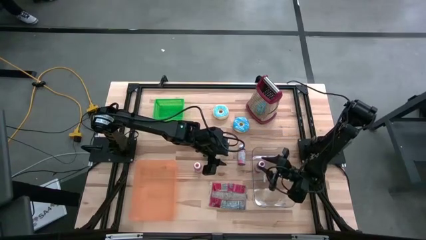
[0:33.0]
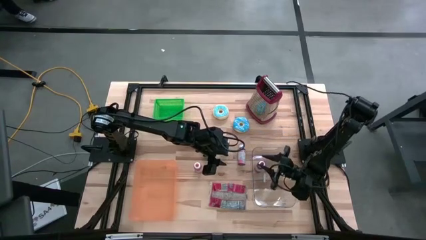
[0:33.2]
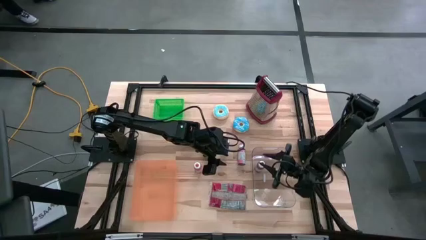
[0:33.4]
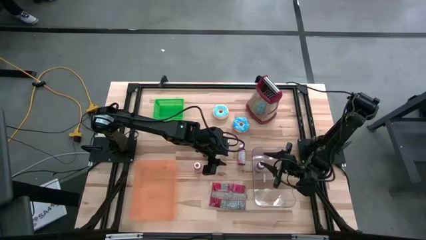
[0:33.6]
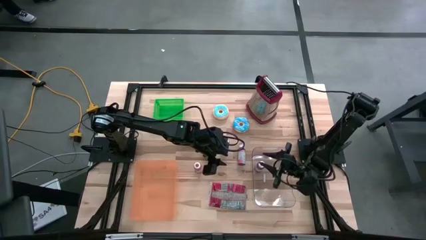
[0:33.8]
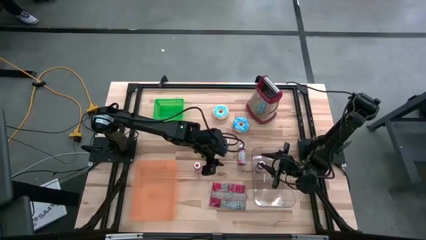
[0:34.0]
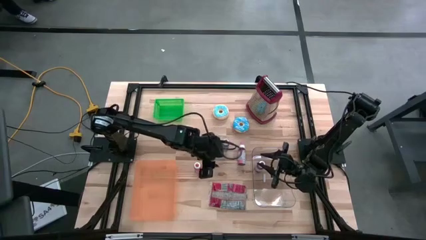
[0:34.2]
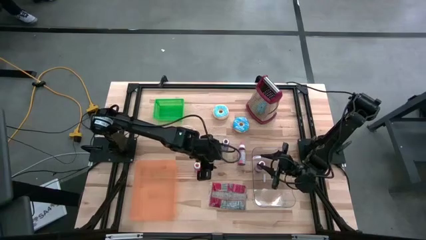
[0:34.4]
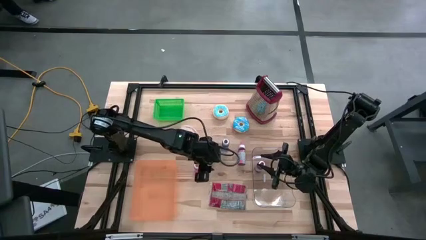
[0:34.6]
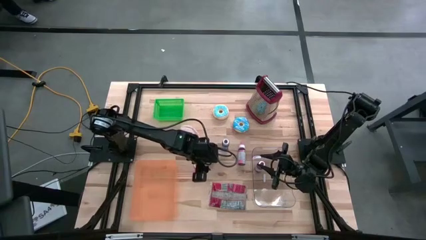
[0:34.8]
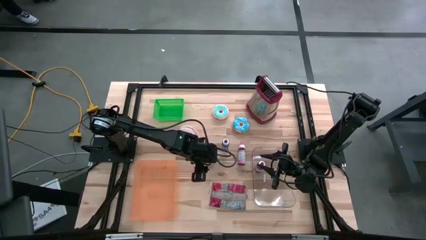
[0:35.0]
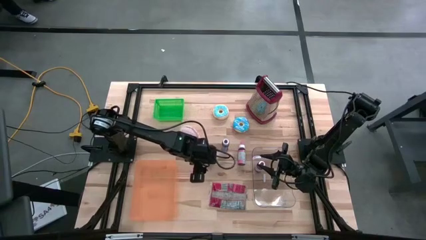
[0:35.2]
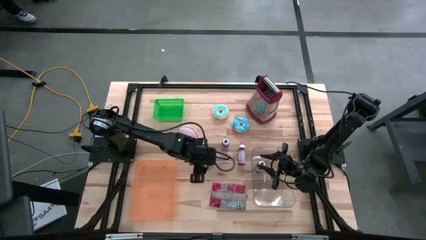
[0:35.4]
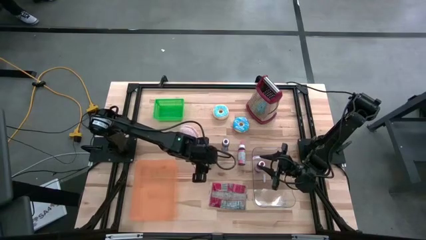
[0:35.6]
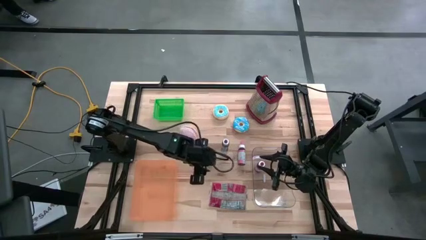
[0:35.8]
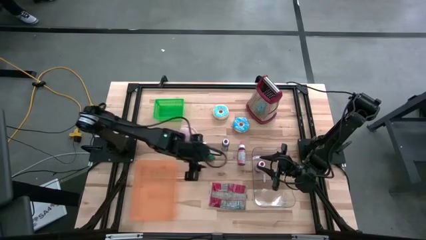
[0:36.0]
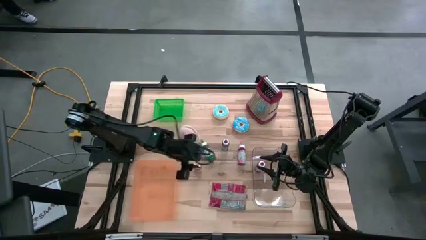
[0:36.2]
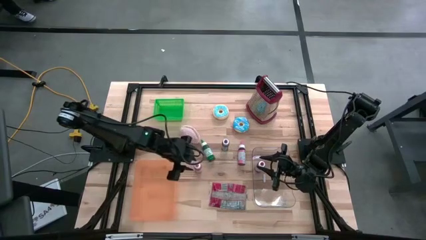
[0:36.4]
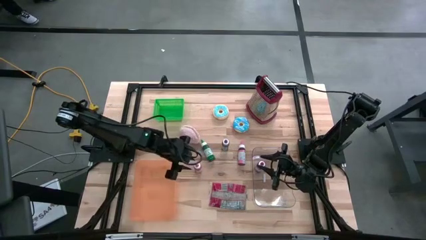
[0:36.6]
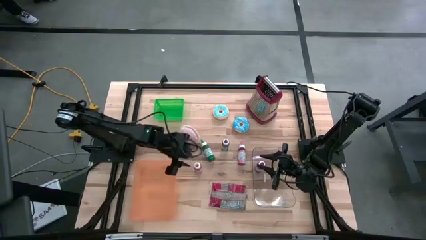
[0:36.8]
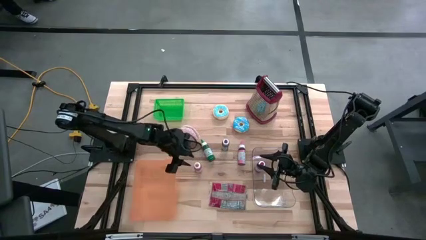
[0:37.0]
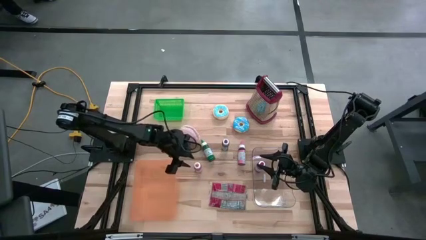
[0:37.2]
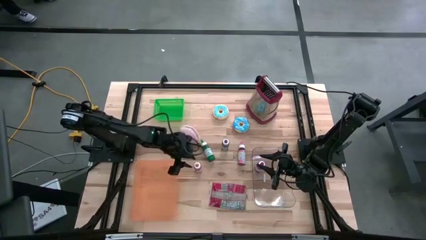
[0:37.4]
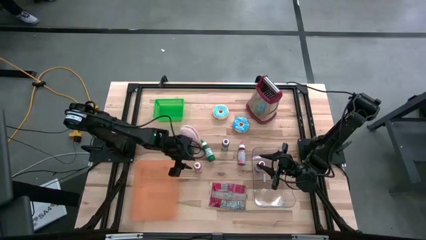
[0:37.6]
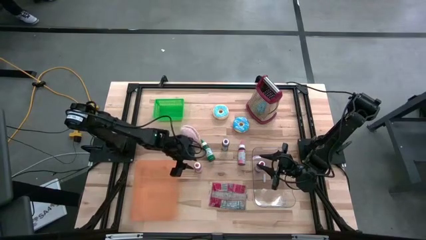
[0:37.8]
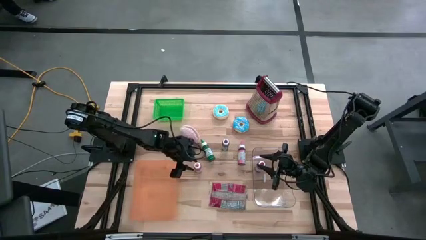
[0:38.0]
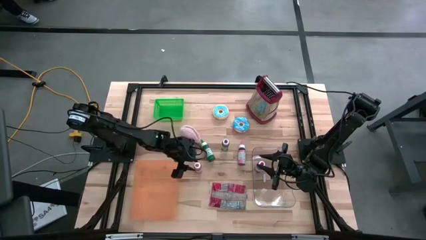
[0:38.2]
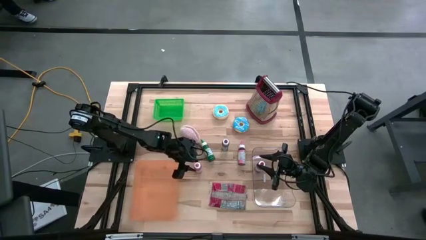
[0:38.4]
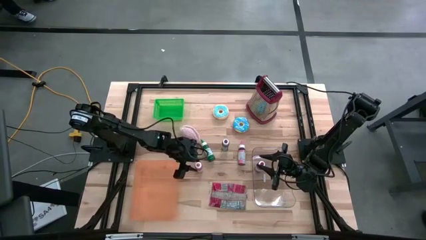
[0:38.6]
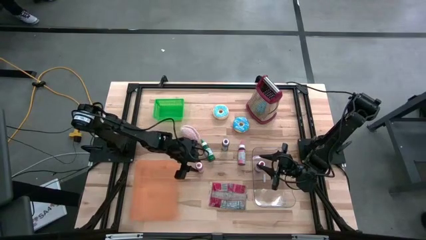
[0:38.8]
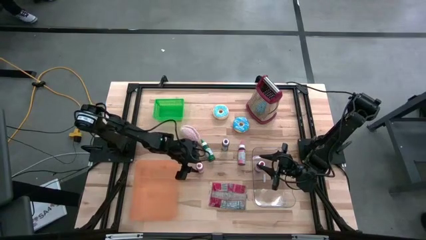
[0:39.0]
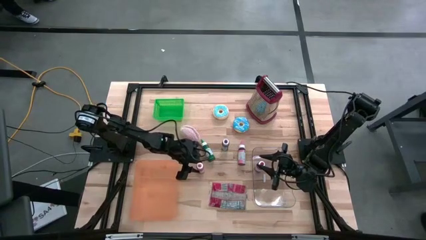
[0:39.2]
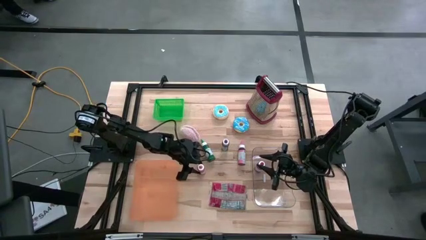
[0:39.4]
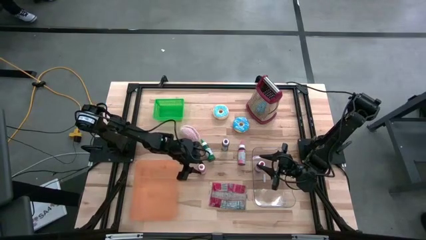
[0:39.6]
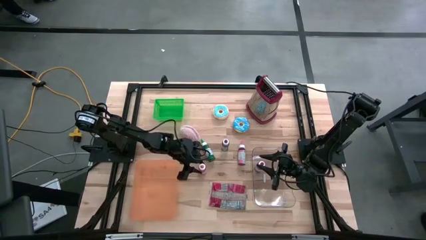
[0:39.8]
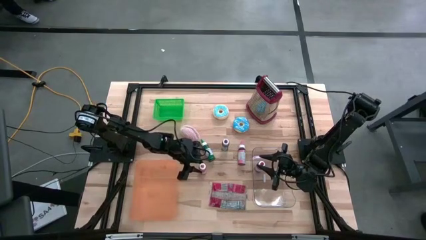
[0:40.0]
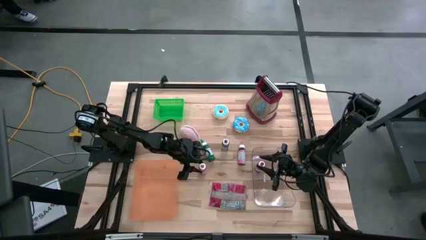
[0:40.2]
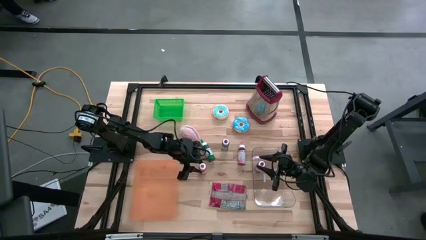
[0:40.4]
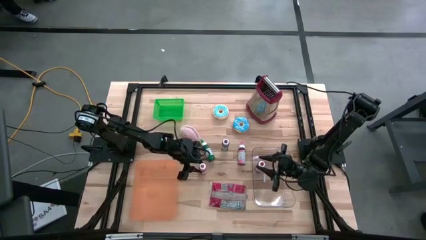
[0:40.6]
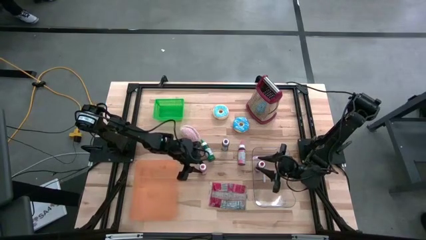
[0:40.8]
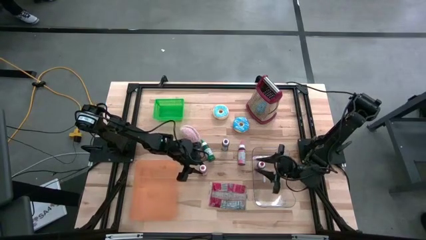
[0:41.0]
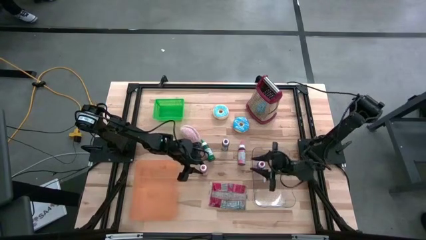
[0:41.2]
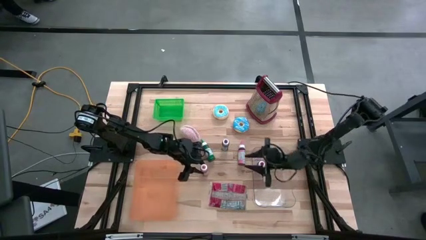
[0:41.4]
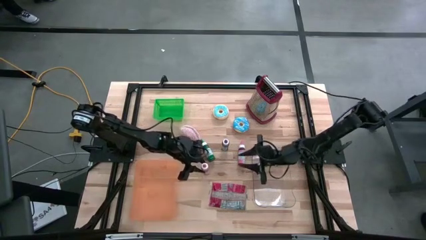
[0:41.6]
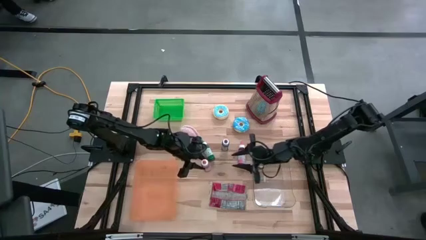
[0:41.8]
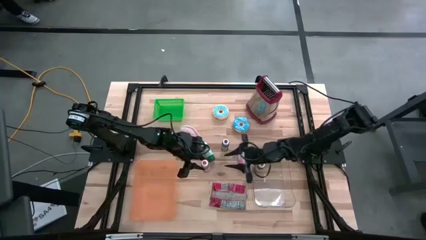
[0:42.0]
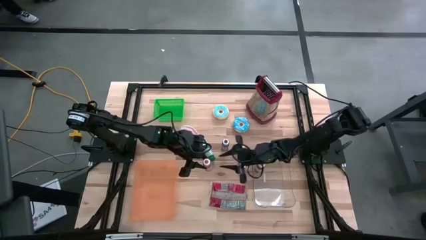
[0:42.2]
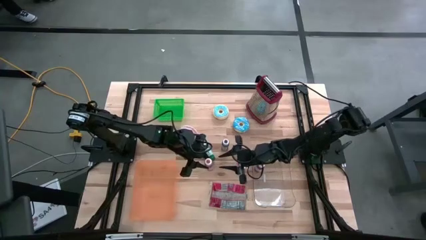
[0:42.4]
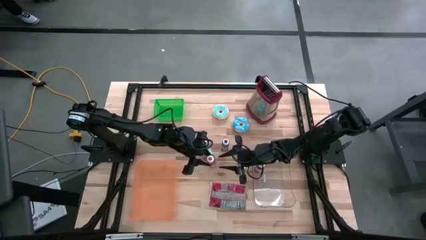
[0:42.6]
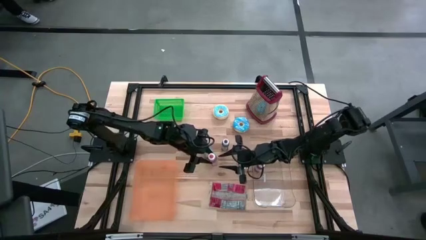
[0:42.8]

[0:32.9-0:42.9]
Put the orange paint bottle into the transparent bin

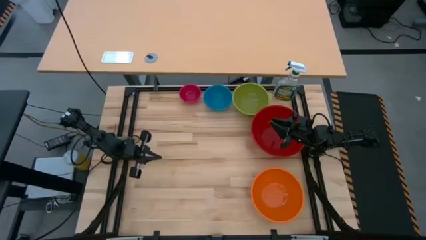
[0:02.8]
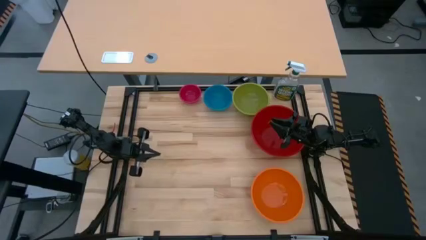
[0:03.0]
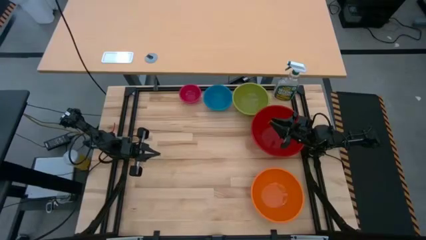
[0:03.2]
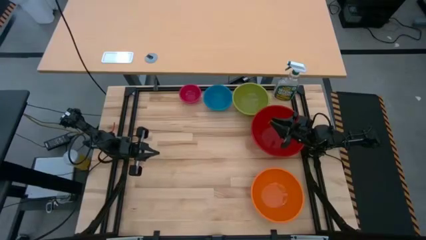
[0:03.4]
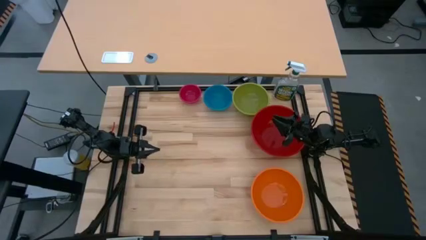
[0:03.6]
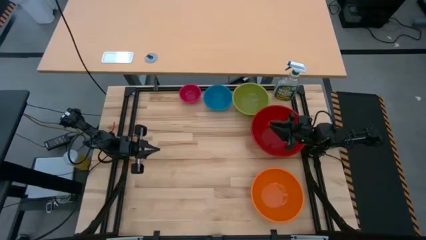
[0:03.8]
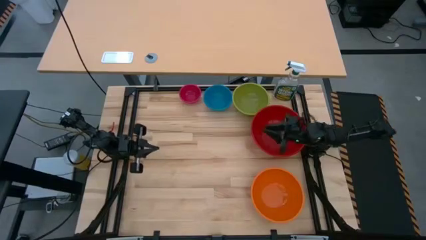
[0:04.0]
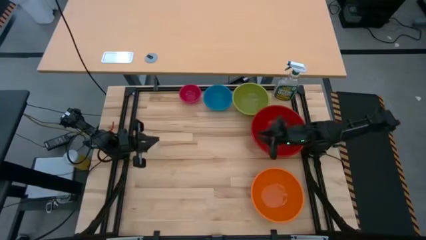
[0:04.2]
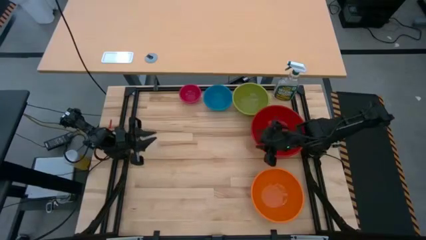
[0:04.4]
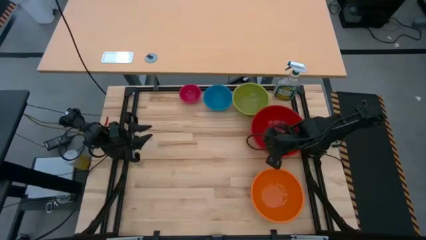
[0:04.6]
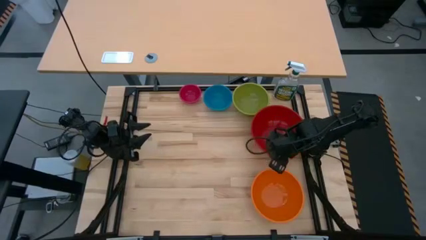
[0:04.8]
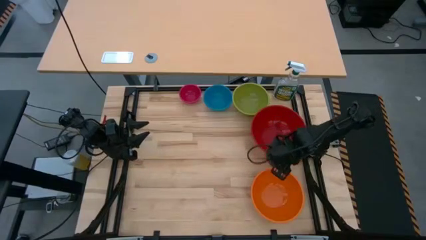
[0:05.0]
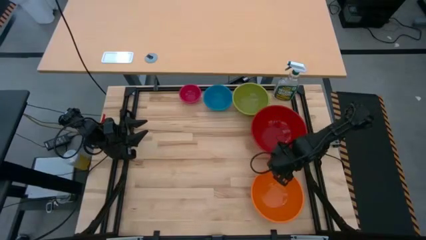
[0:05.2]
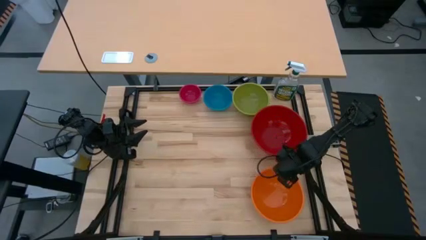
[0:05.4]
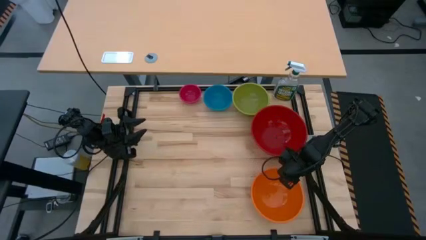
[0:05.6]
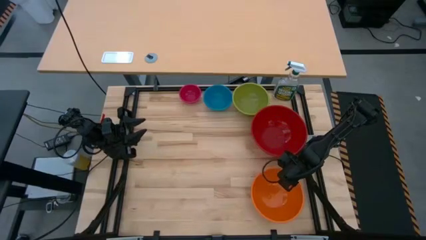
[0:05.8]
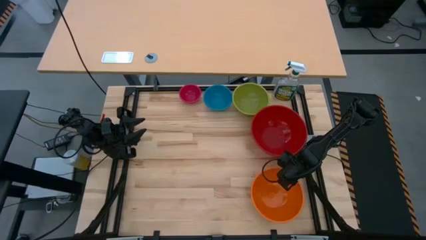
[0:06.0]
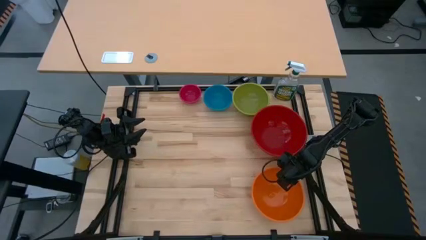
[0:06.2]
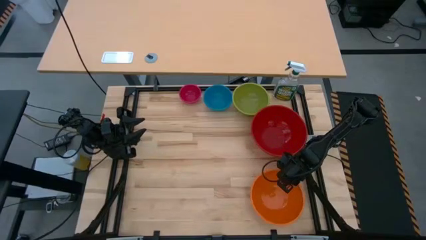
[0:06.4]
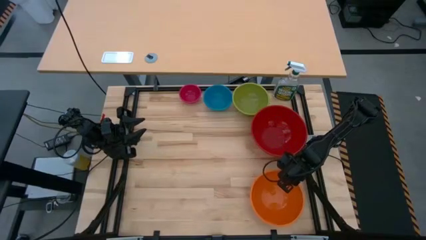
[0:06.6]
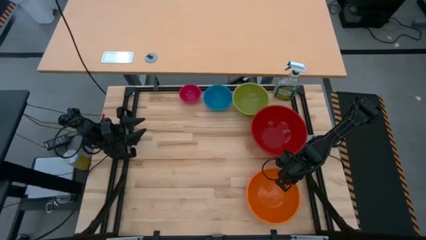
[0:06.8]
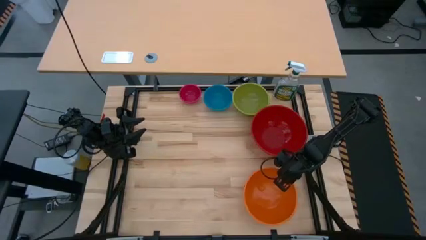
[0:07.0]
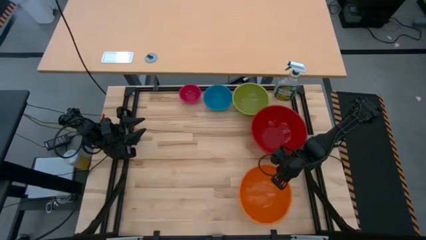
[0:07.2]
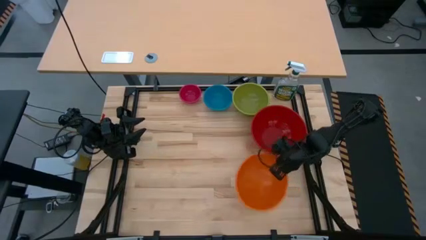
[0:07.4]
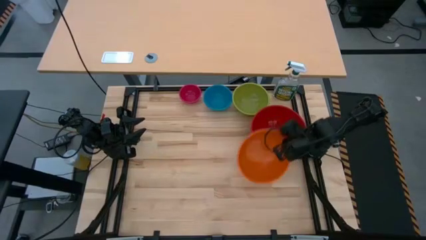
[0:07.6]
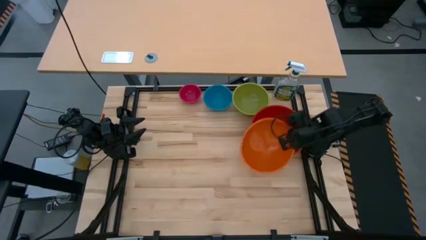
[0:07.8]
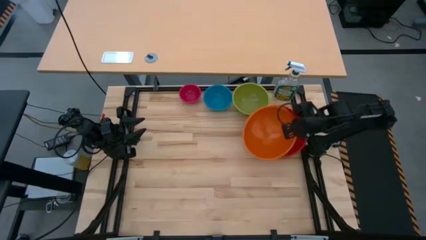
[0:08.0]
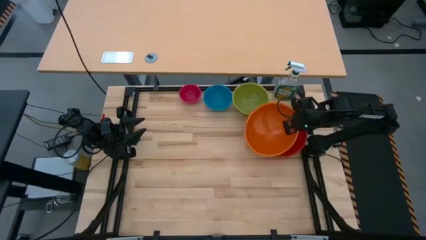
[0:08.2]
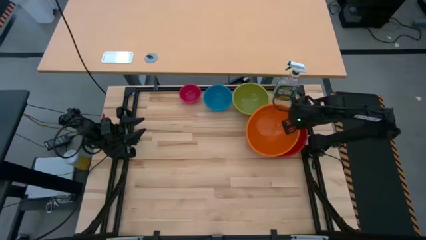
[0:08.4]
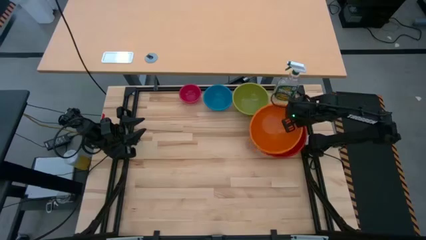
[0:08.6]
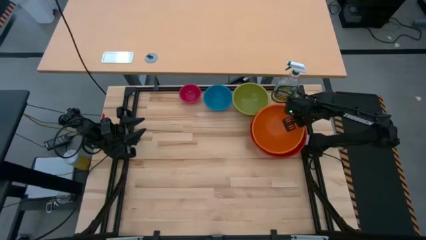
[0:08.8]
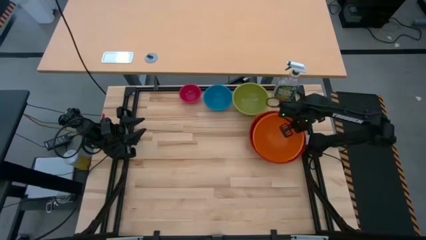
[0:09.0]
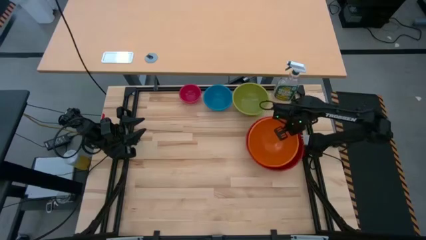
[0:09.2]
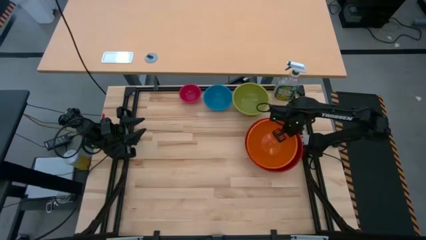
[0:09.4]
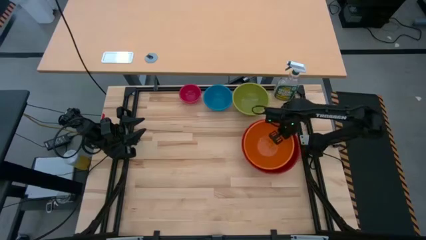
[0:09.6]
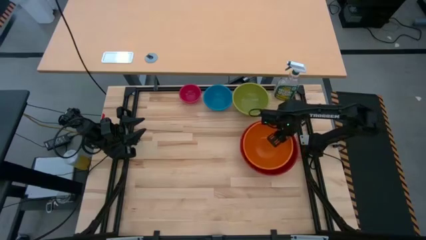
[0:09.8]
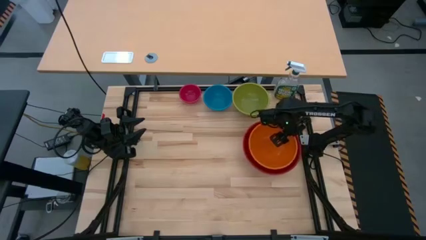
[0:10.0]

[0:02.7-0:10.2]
Stack the orange bowl on the red bowl
